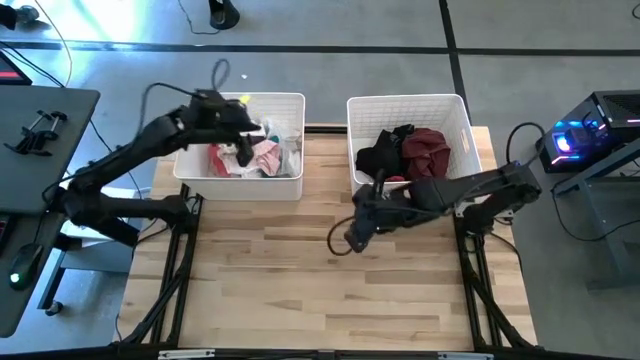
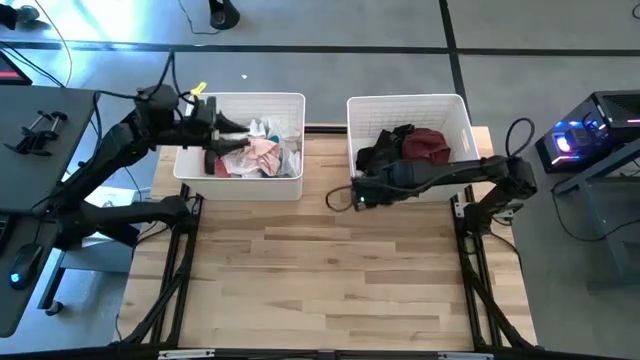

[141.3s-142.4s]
Task: Sort clothes
Adjust the right white laundry bin

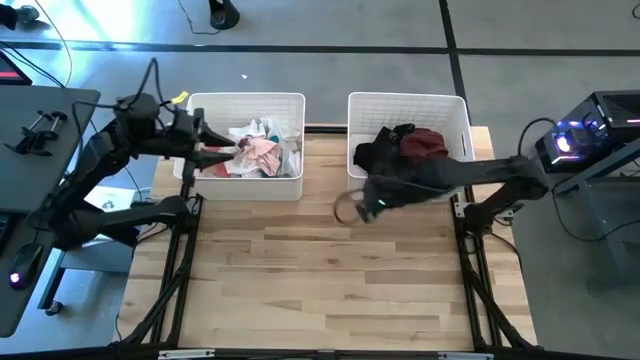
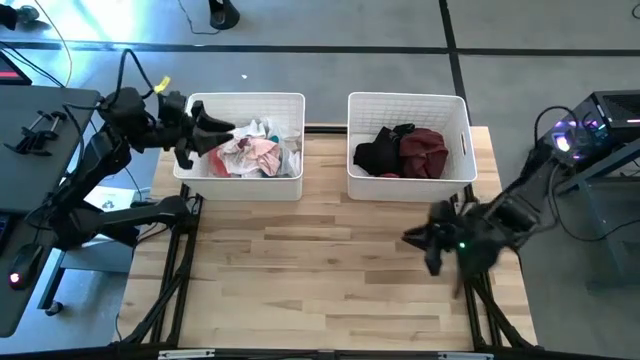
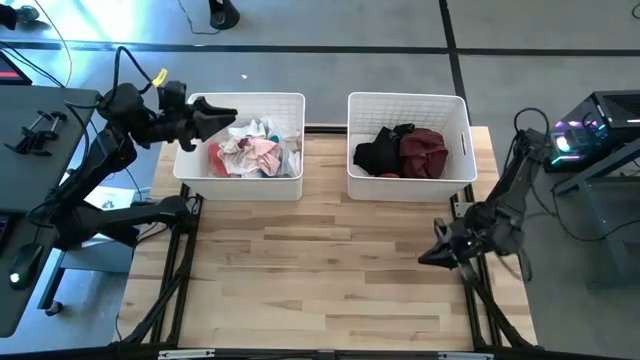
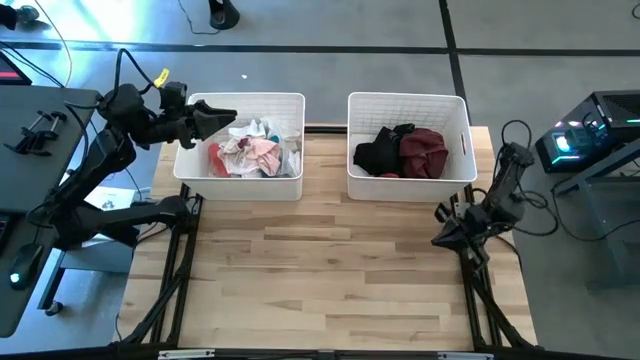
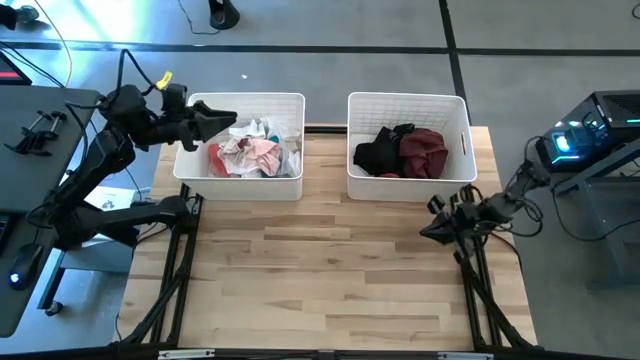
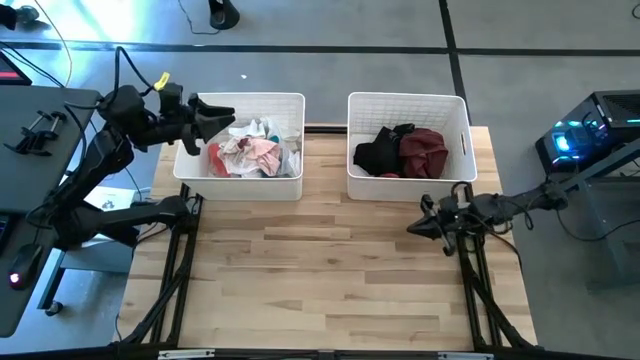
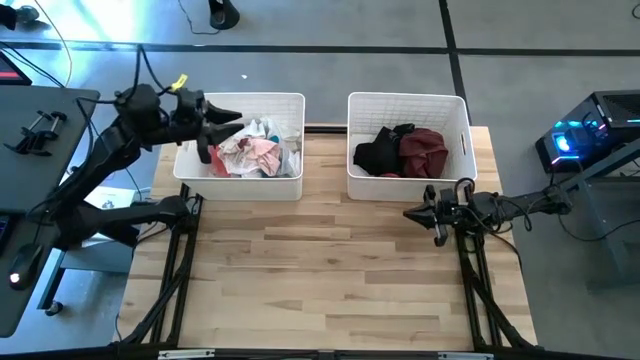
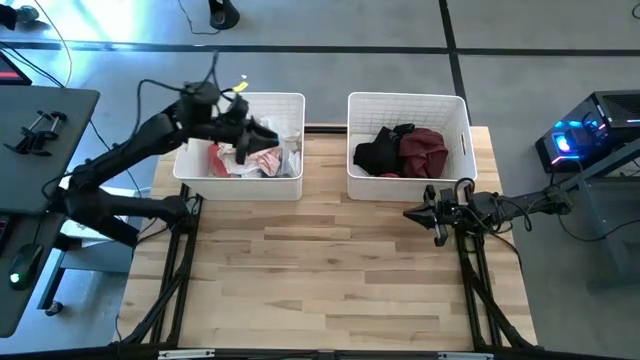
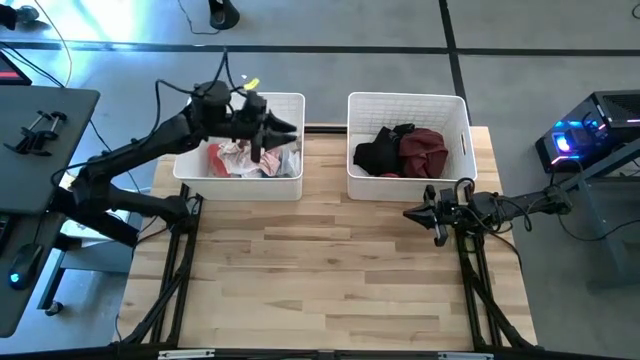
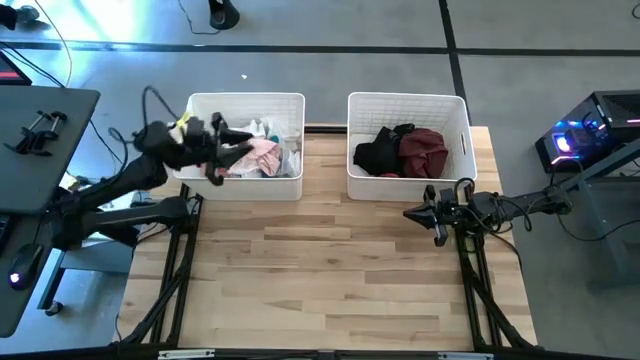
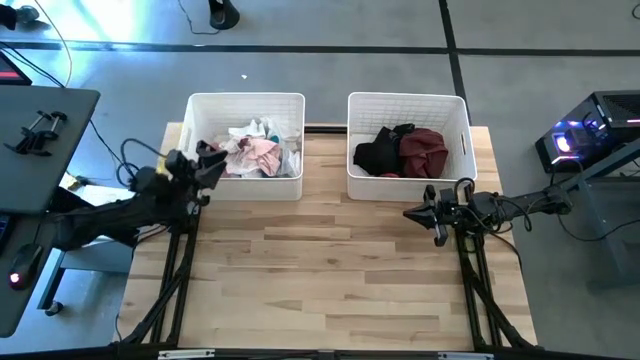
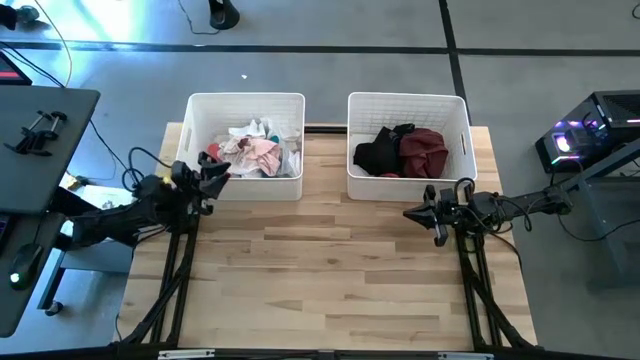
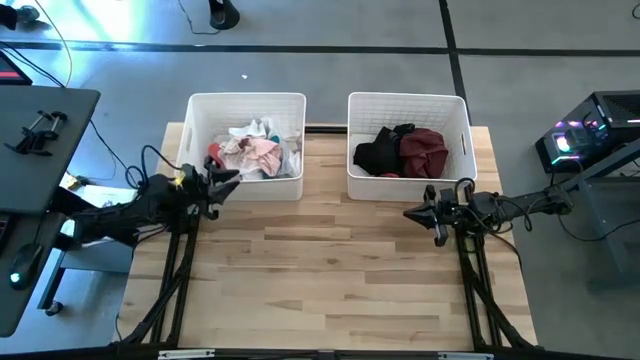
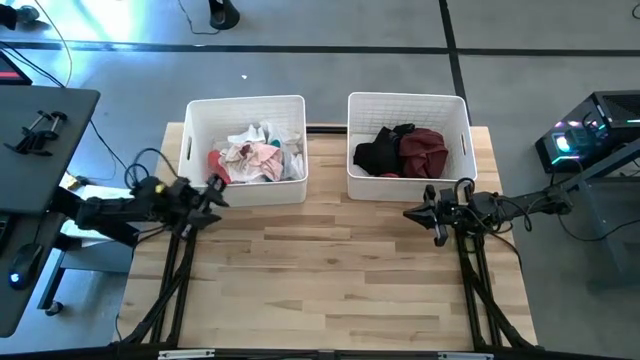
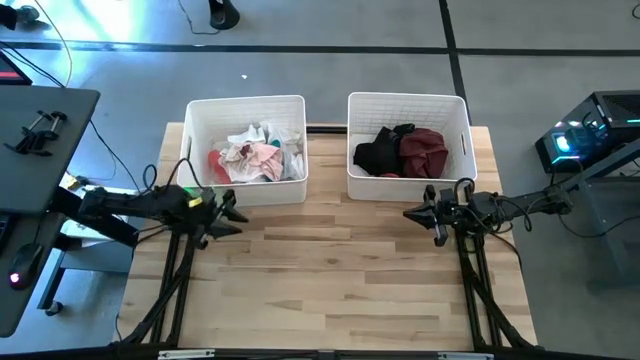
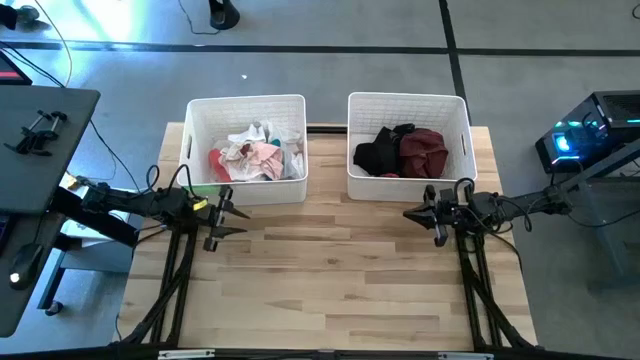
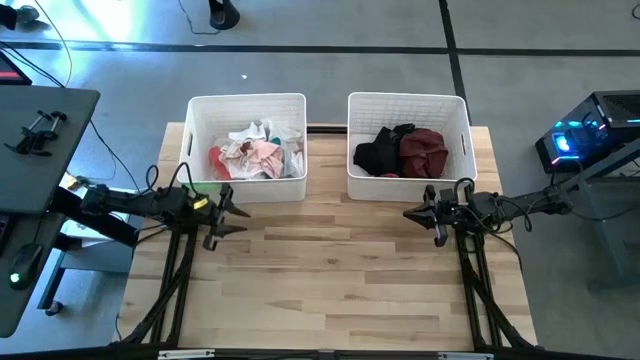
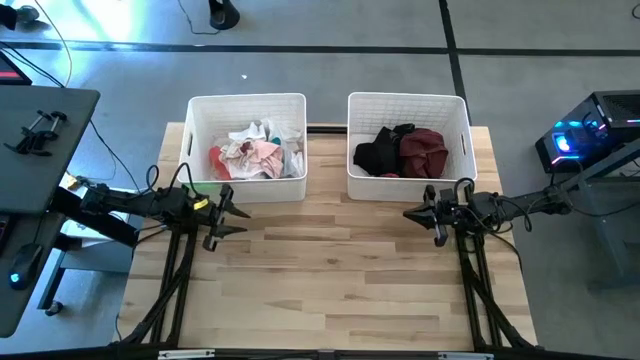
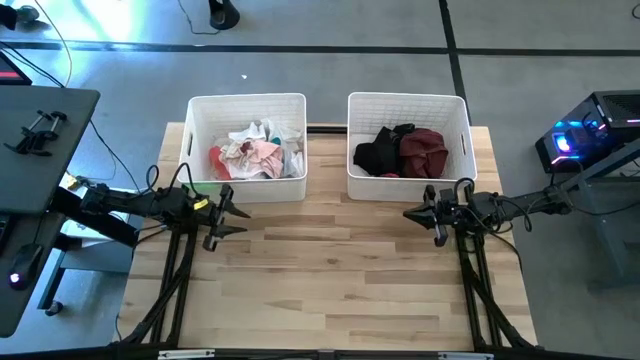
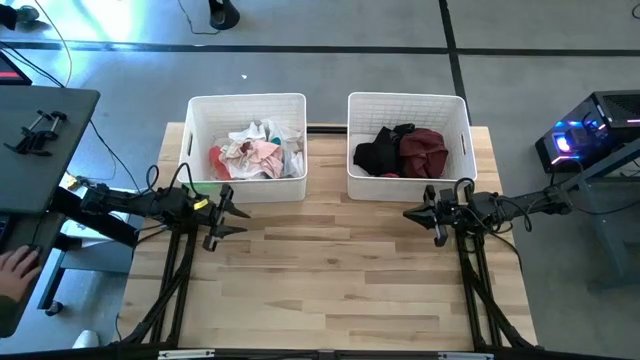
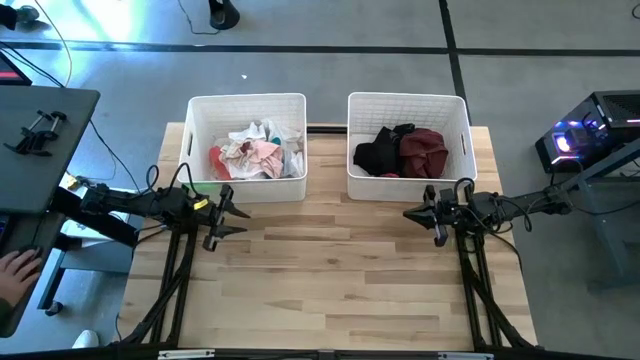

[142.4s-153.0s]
Return to Home Position

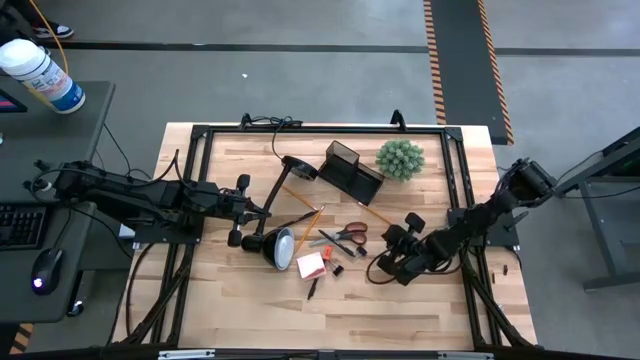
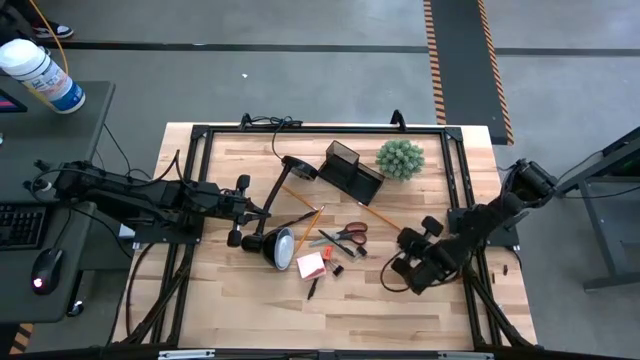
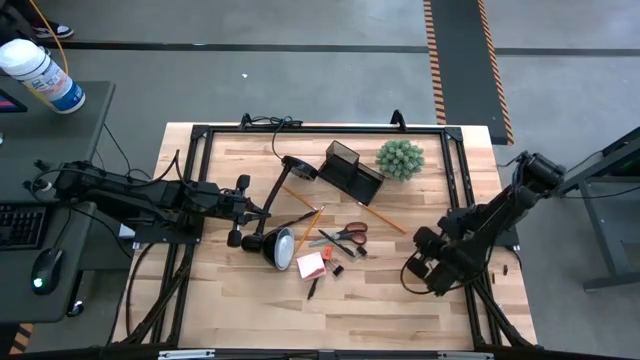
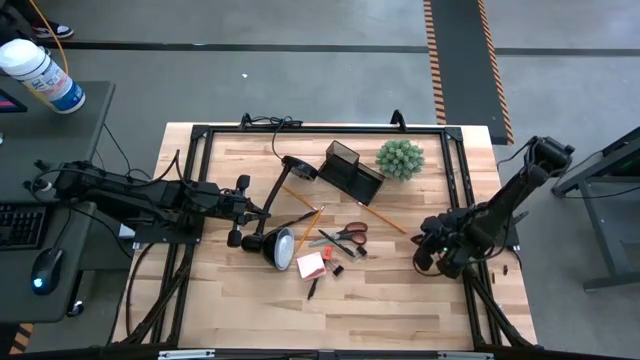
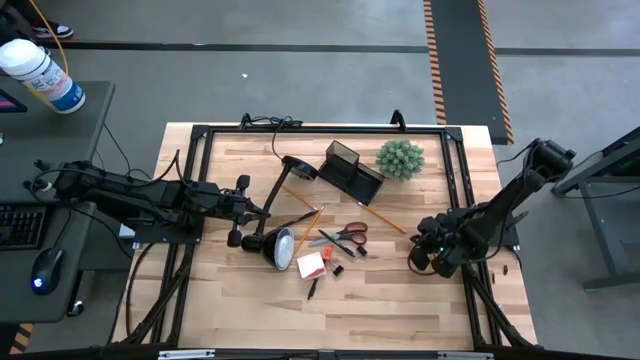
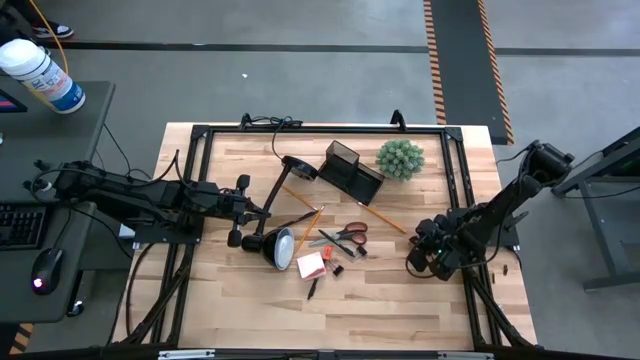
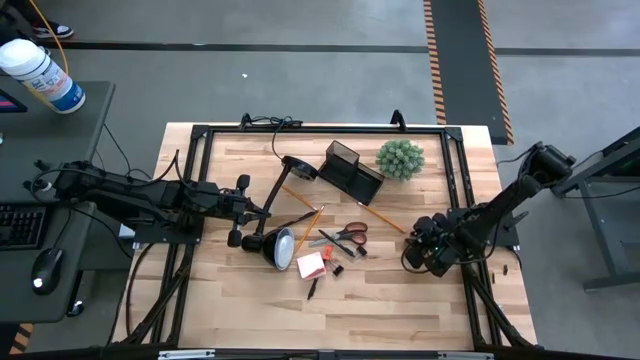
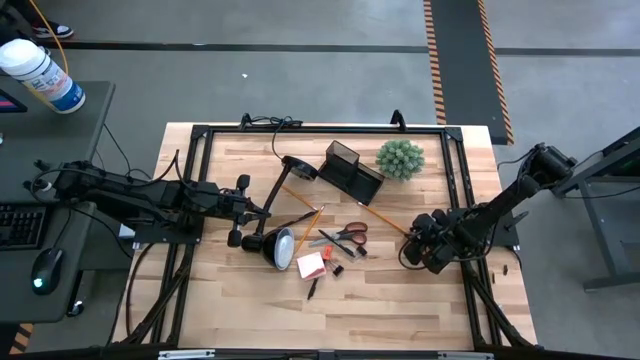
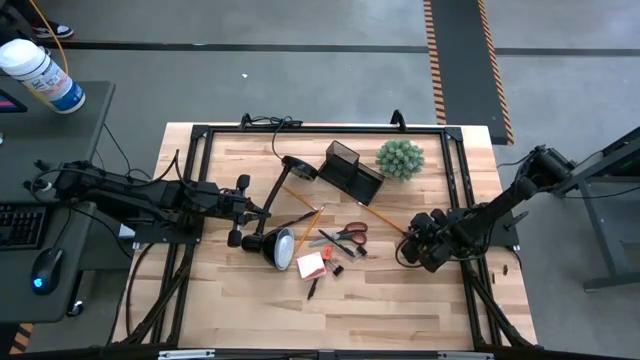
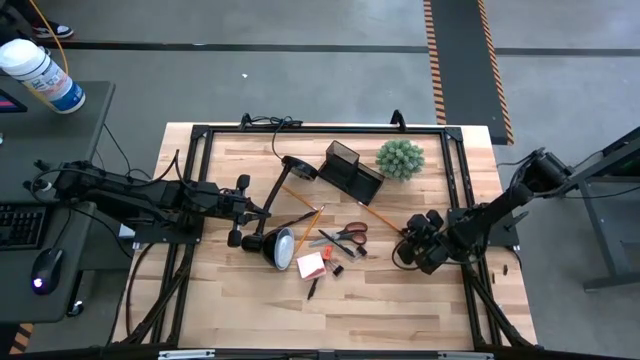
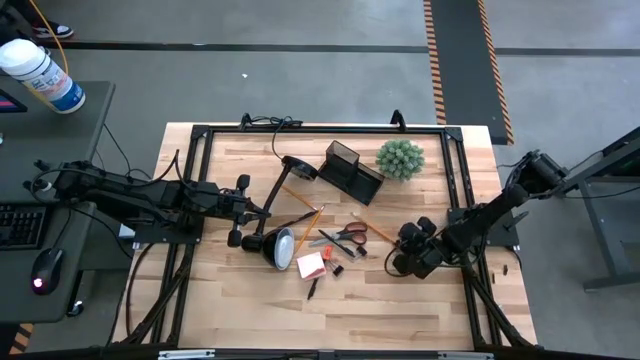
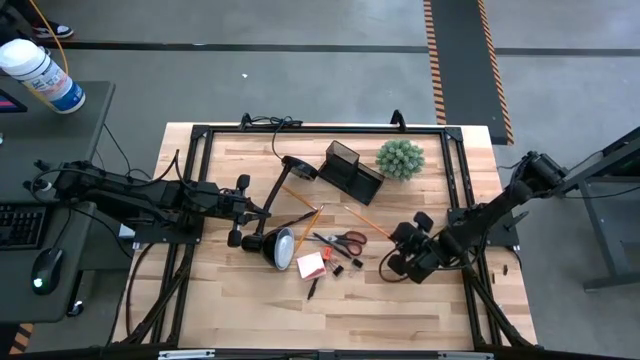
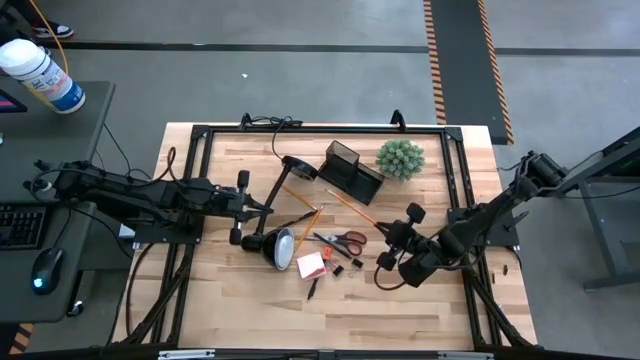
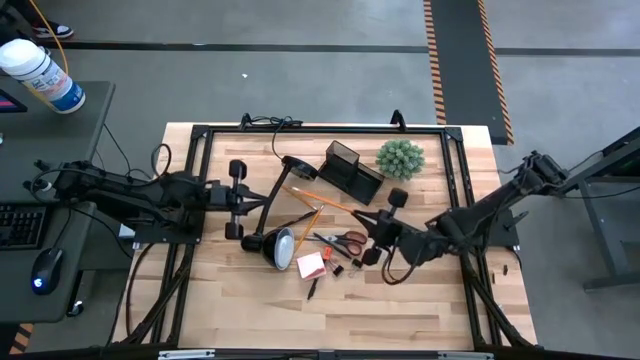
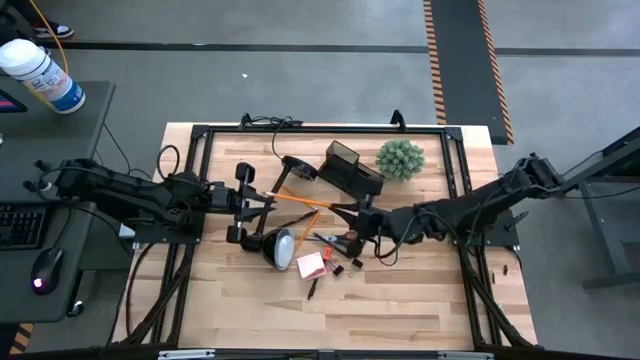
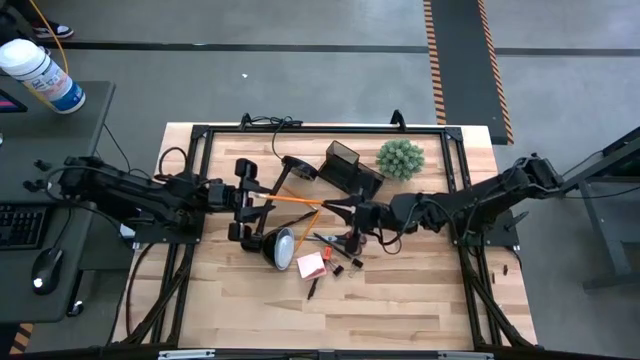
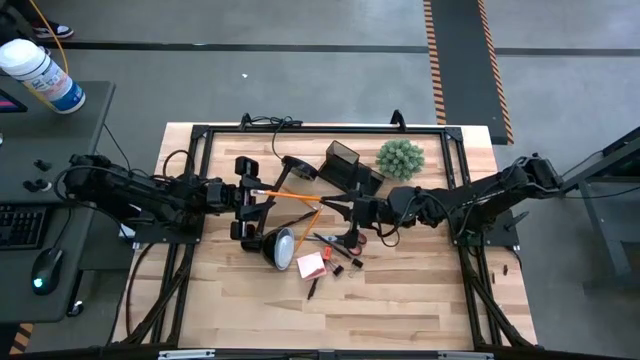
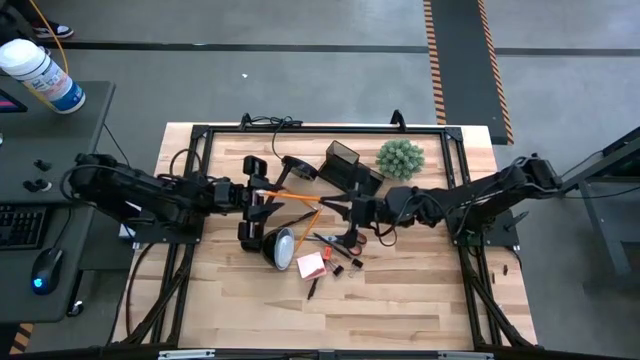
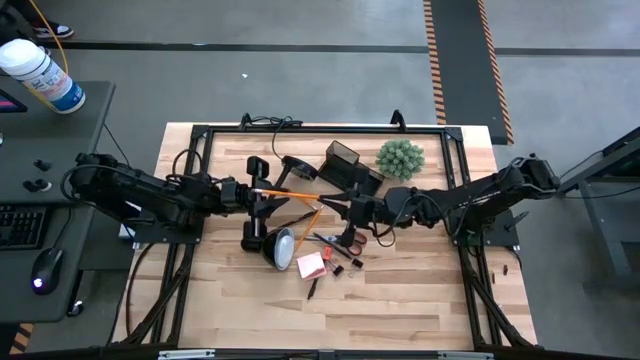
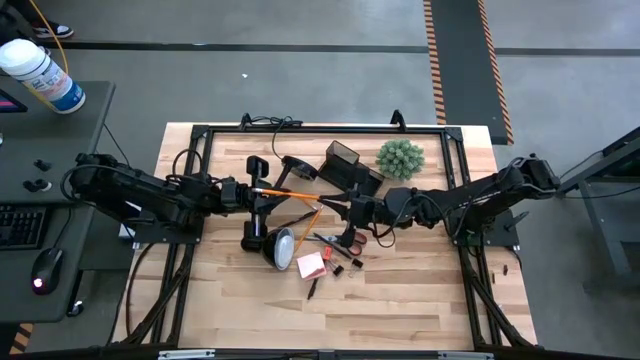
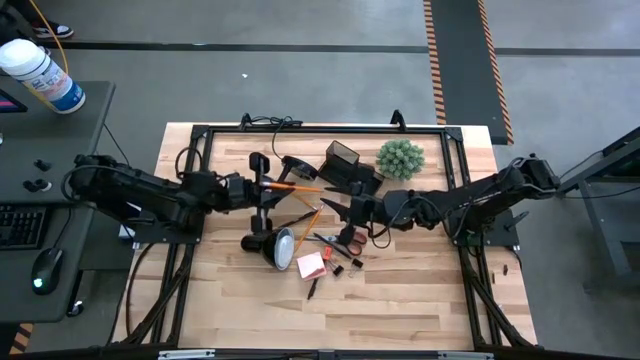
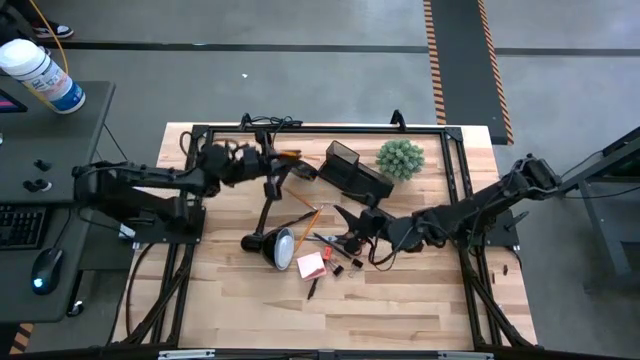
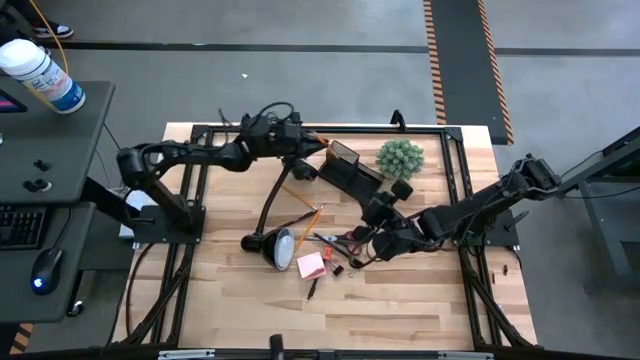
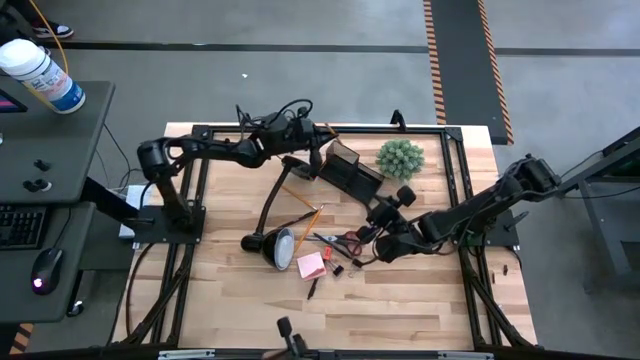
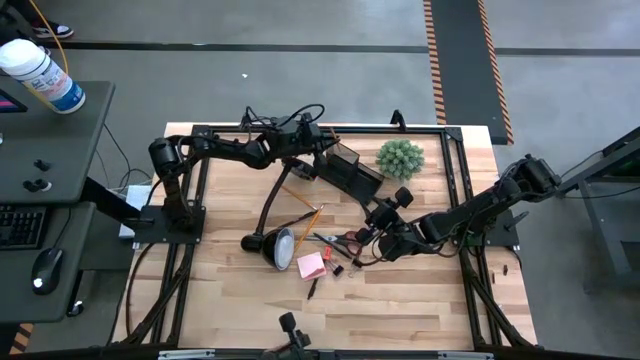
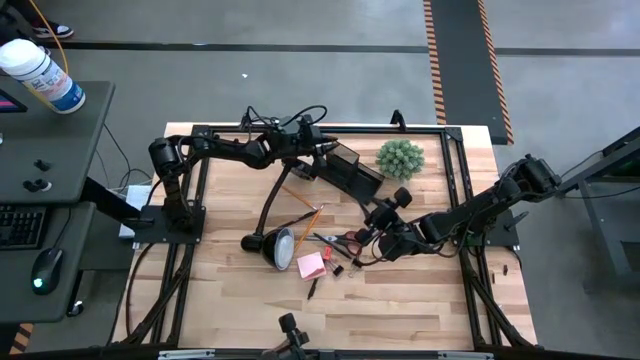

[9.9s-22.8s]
Task: Pick and place office supplies into organizer
Put the right orange pencil into the desk organizer
